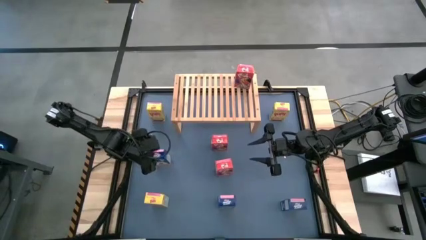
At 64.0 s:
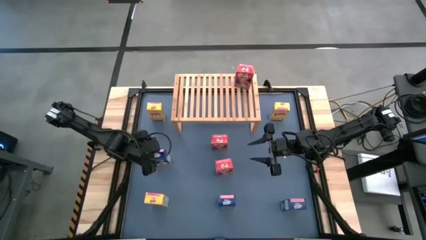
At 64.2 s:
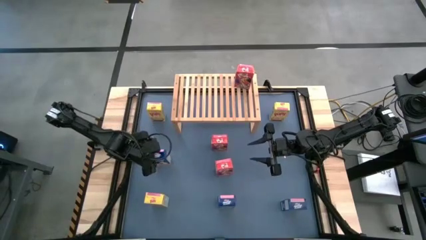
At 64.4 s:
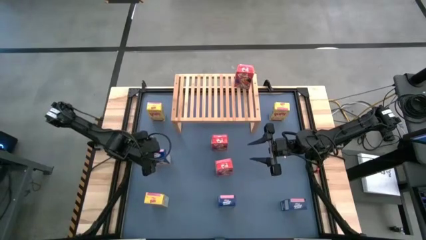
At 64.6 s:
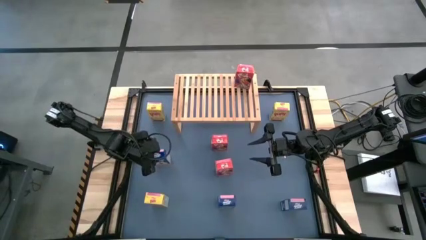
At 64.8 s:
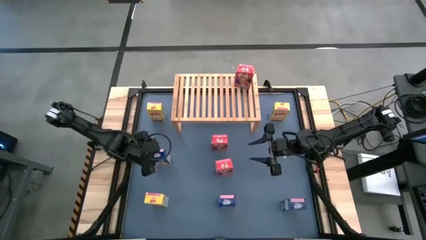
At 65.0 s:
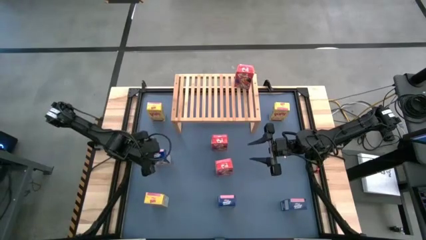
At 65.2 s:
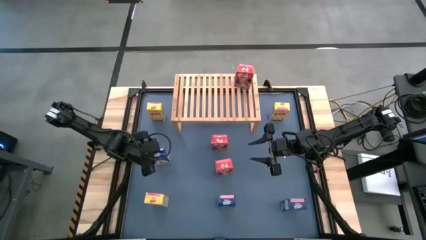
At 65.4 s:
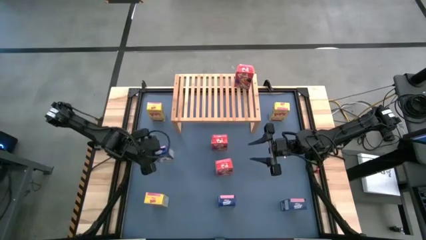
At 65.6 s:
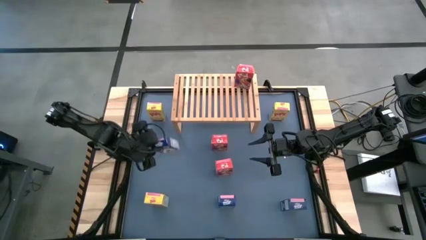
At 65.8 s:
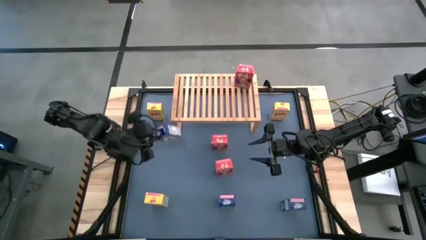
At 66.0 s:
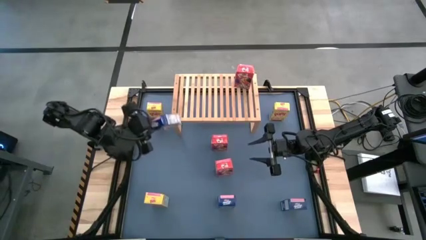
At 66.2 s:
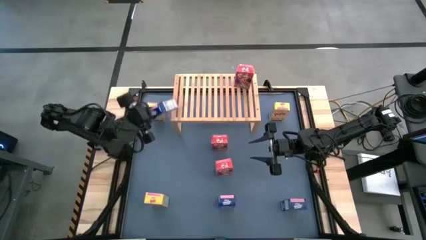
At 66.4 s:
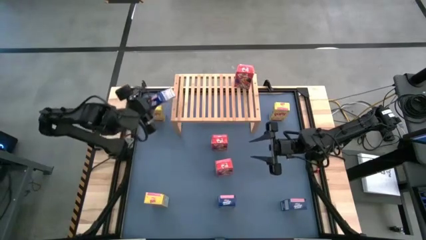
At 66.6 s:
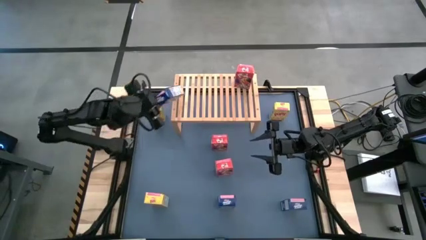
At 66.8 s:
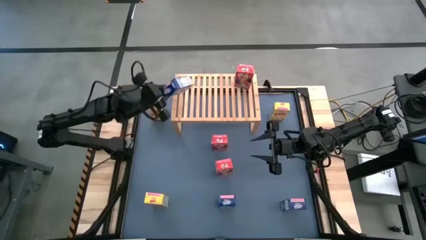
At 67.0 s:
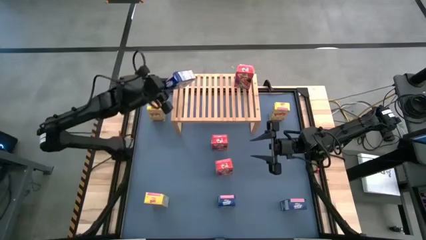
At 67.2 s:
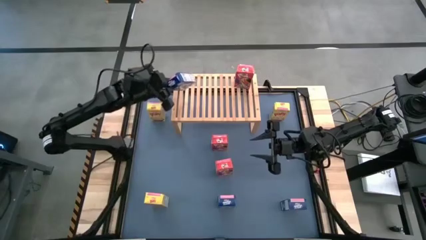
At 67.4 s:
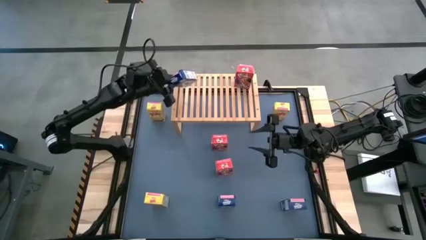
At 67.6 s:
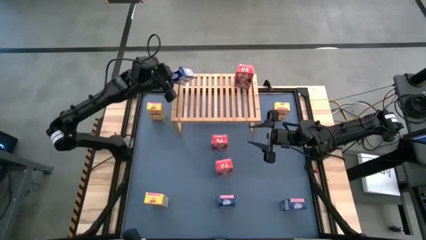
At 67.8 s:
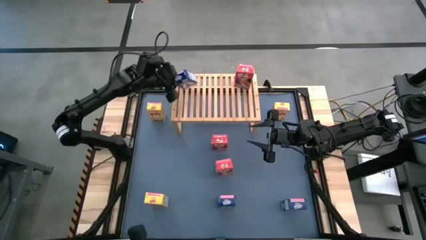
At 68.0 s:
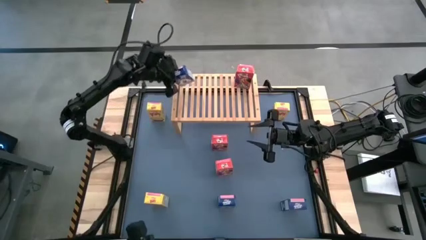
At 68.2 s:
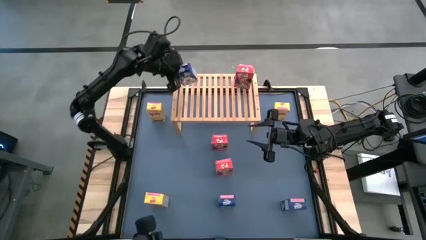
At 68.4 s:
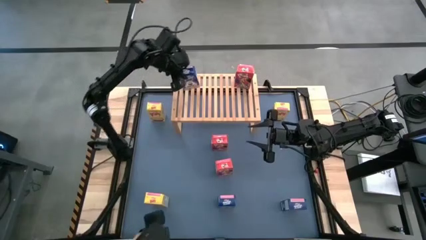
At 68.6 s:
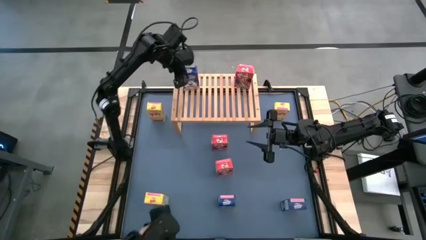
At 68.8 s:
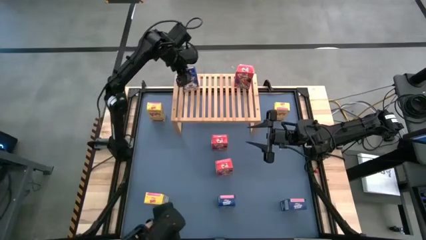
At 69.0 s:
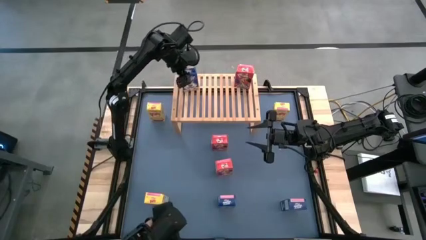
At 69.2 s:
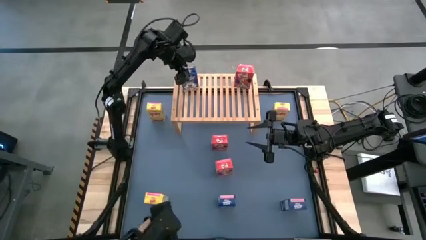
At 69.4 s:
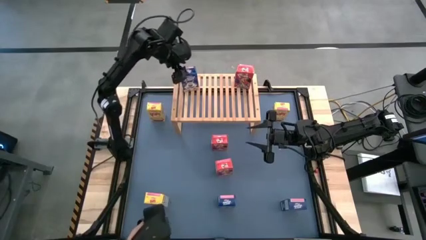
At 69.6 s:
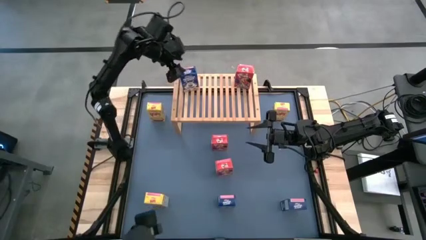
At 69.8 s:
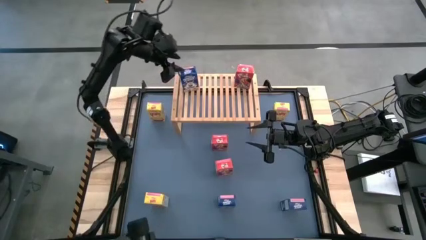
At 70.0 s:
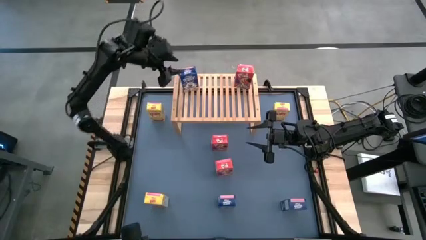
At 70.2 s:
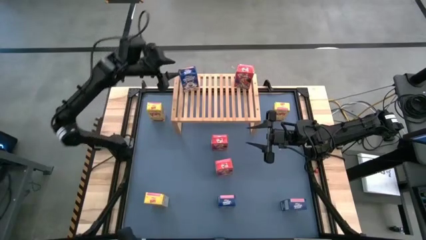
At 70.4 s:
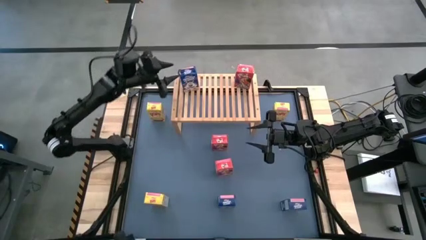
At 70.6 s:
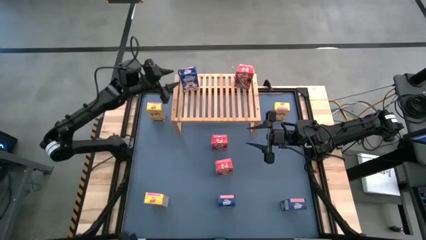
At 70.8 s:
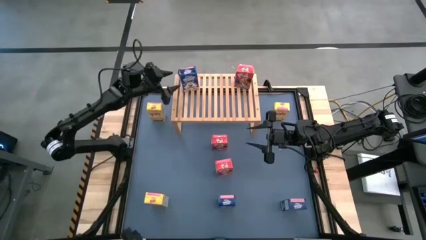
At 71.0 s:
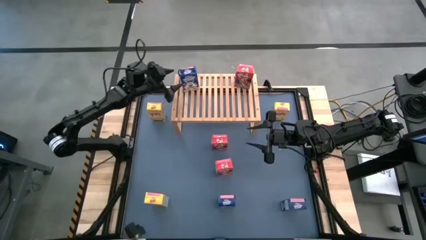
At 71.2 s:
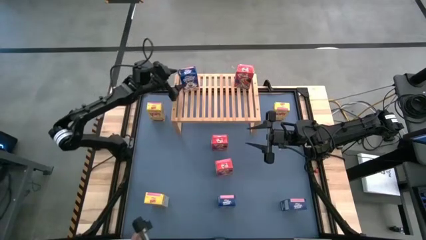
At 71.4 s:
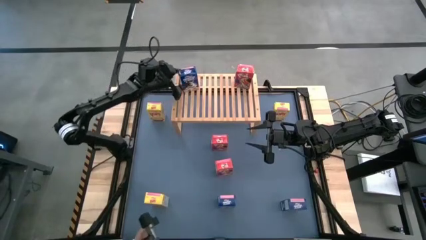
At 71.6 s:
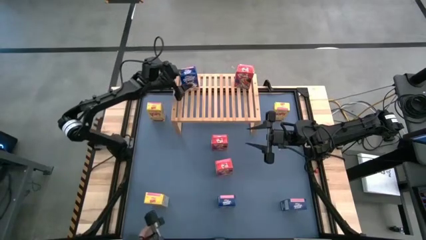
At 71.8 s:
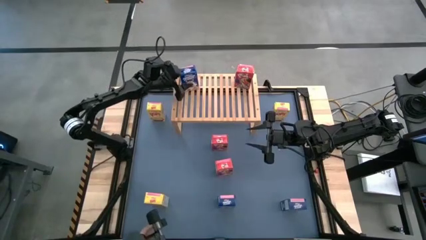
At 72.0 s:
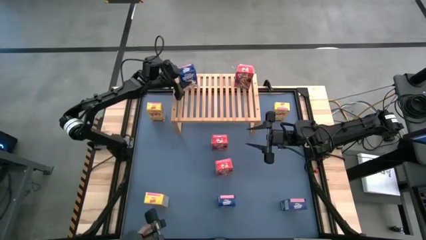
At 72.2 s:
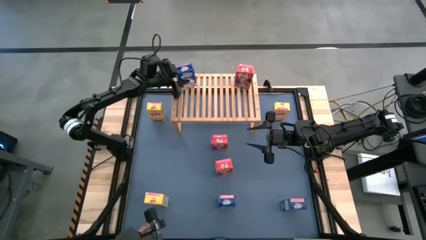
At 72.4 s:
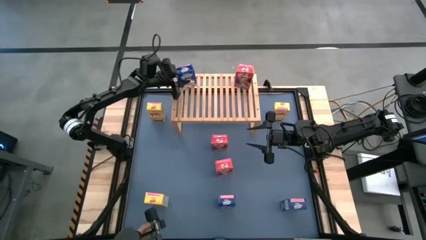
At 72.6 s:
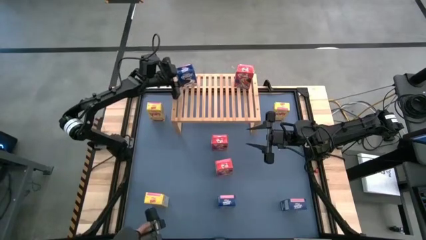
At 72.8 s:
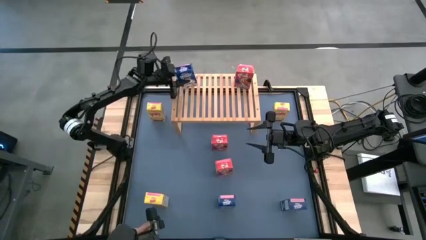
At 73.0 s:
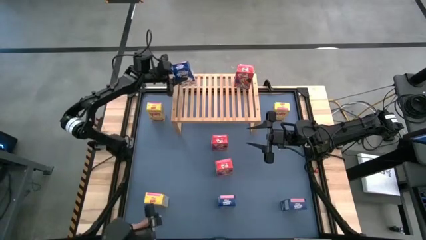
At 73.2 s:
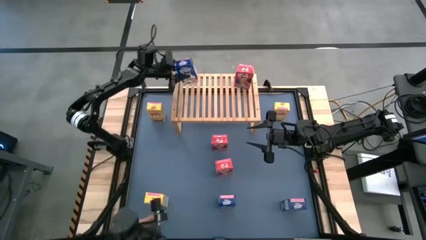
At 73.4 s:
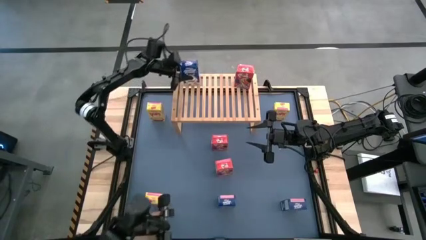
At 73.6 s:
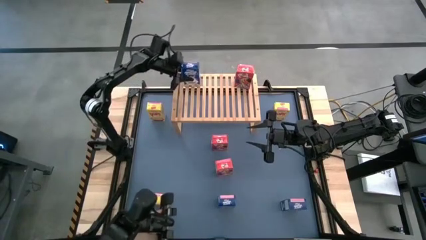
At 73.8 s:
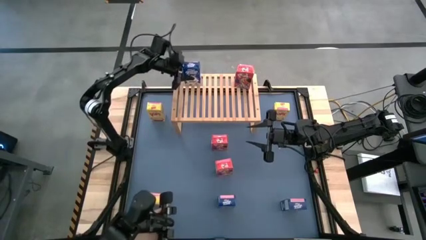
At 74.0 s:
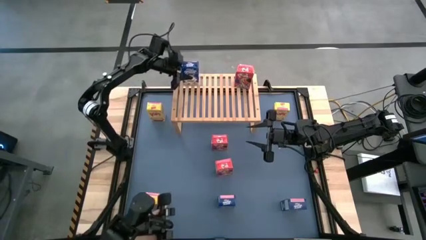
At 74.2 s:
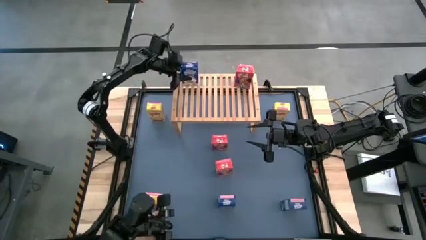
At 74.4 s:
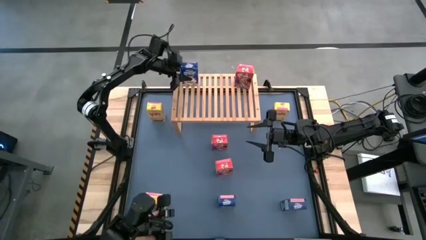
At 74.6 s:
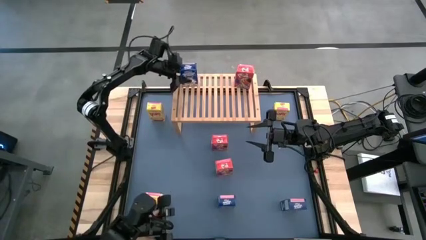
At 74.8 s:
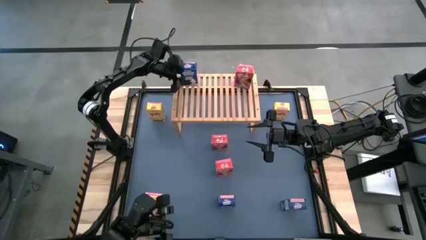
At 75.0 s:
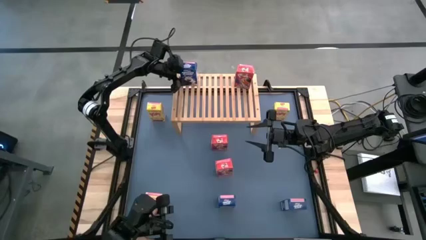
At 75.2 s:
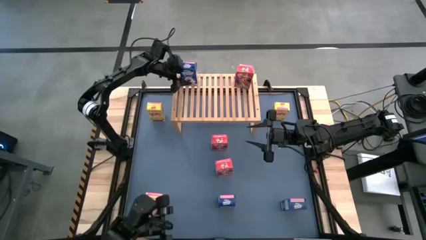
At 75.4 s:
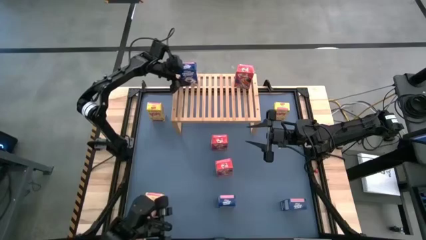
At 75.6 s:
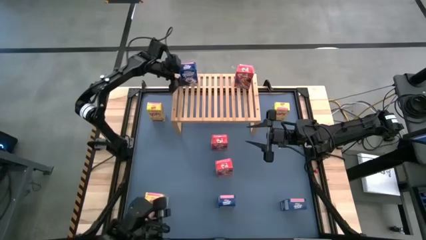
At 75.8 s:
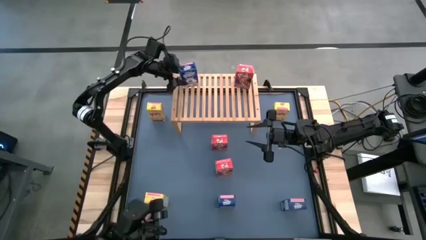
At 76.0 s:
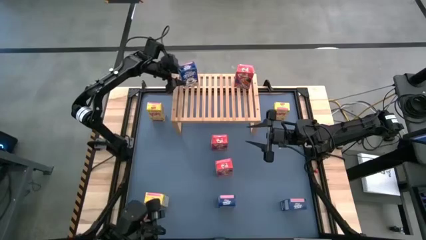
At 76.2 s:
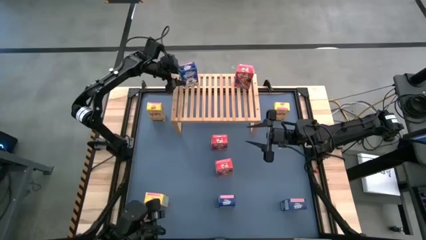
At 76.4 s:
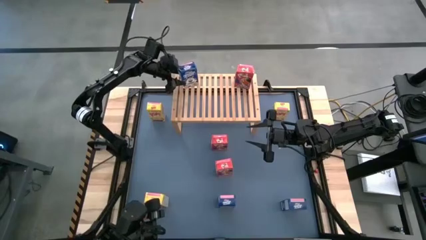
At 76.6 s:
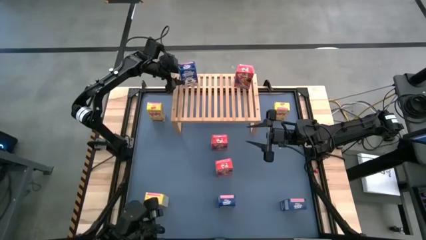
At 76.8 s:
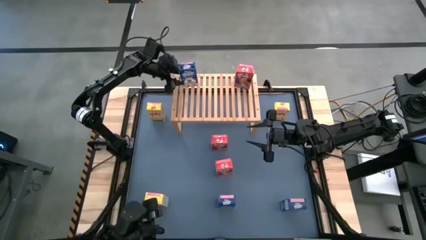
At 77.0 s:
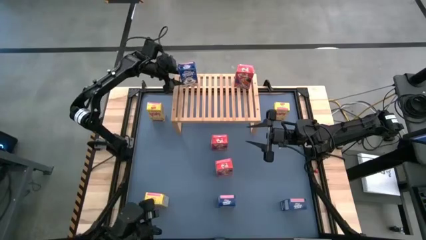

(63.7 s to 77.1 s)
Task: Stack cereal on shelf
Put the top blue cereal box on the shelf

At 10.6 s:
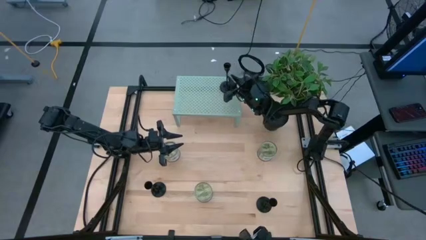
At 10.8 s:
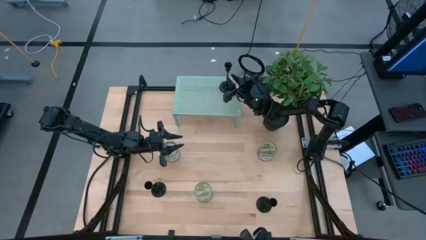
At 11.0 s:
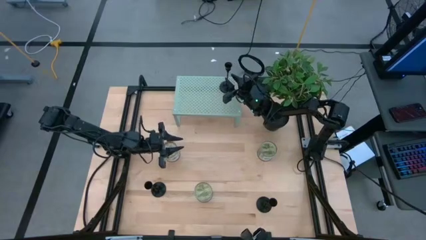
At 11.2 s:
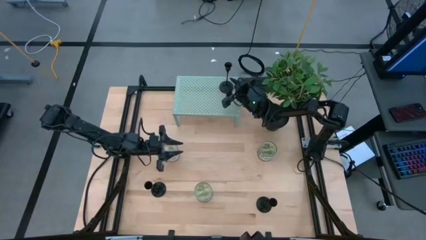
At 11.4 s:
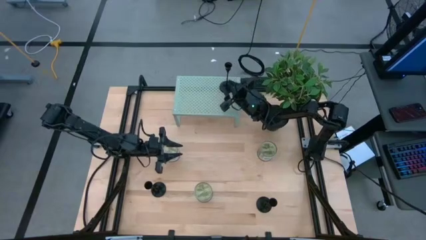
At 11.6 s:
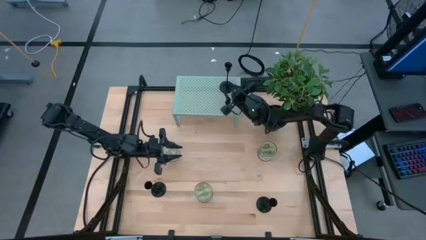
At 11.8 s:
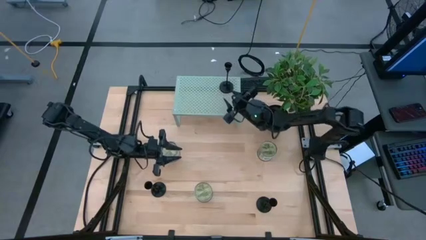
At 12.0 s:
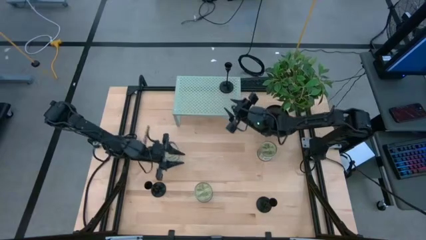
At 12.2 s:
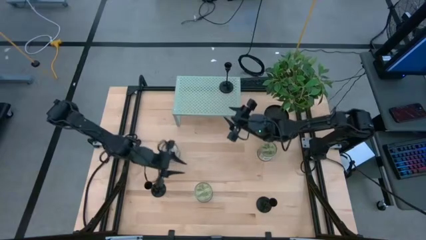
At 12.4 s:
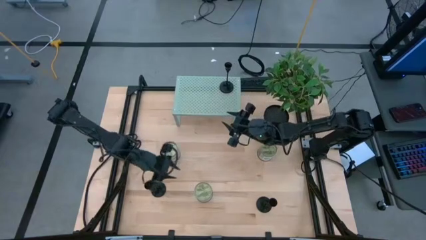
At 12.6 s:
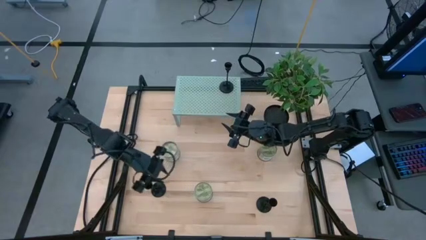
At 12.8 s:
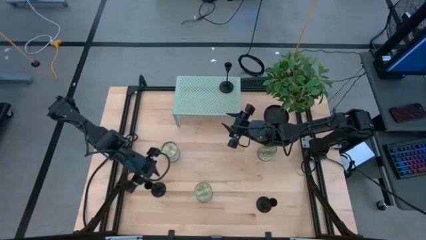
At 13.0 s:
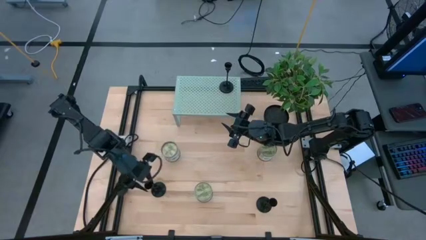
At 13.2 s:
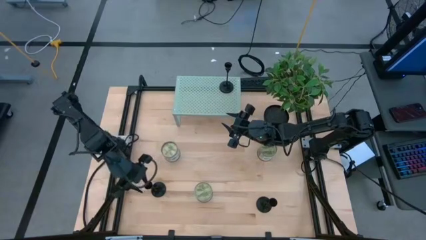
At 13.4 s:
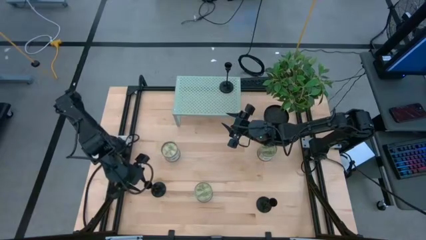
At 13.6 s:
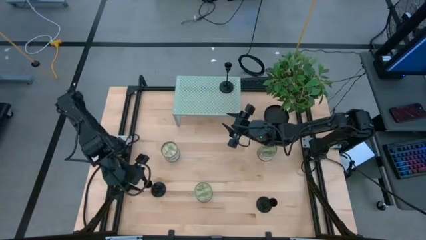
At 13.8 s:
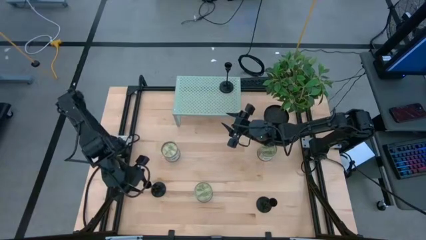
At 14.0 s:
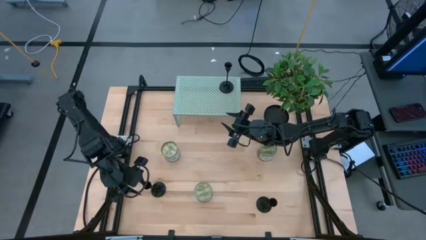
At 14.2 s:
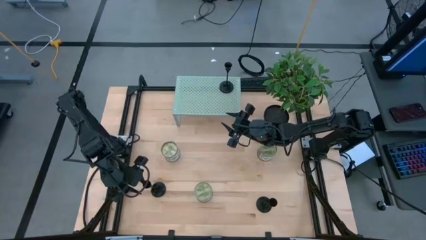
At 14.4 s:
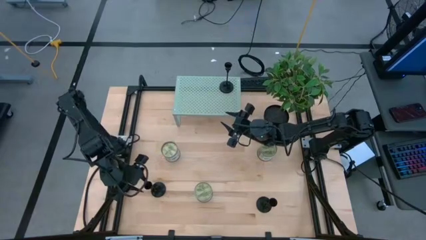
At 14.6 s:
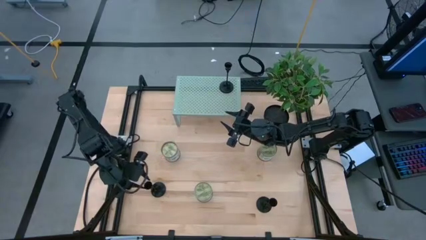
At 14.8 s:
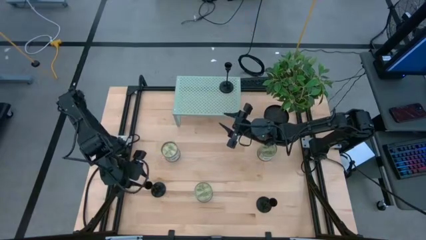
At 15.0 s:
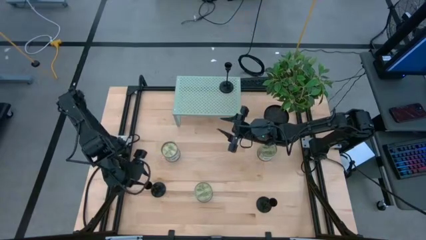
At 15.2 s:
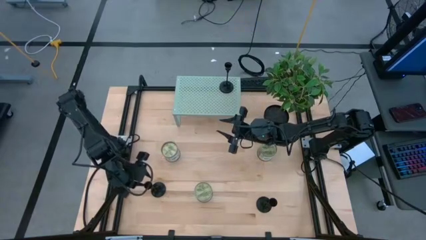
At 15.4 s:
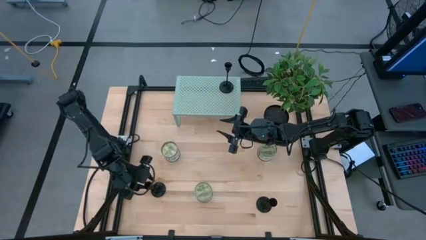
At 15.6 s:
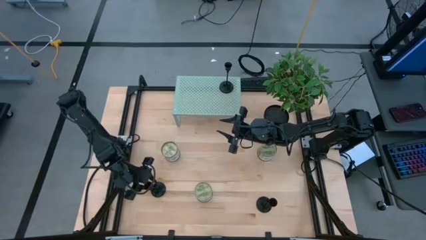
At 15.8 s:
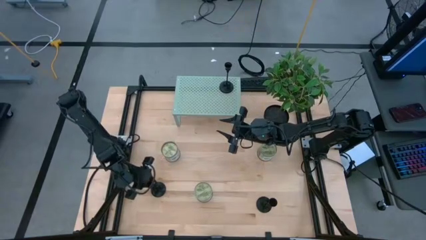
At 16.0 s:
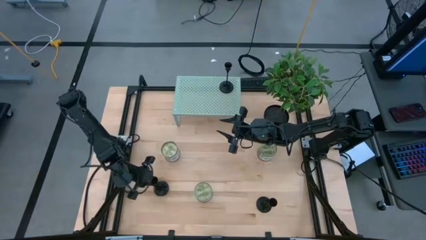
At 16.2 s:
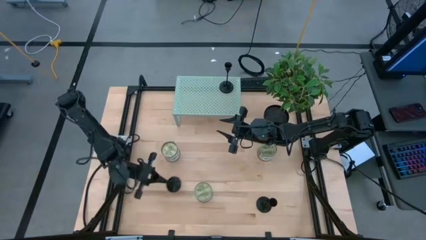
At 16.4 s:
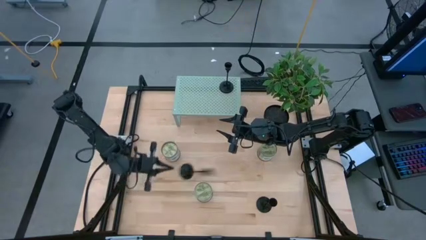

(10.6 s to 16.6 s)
Task: Pick & Place candle stick holders
Put the left candle holder on the shelf
